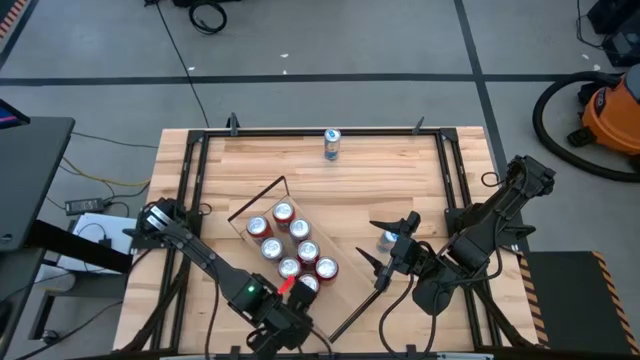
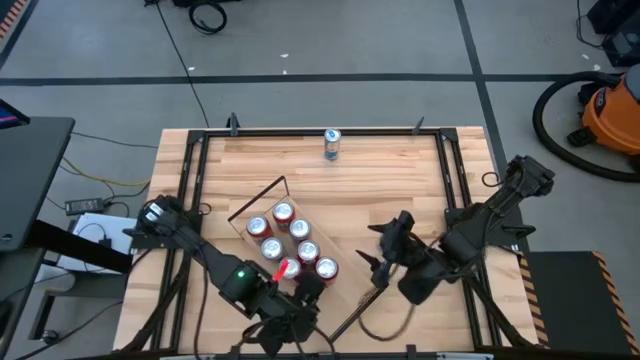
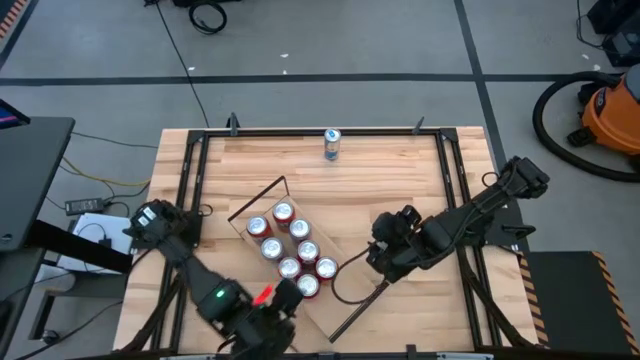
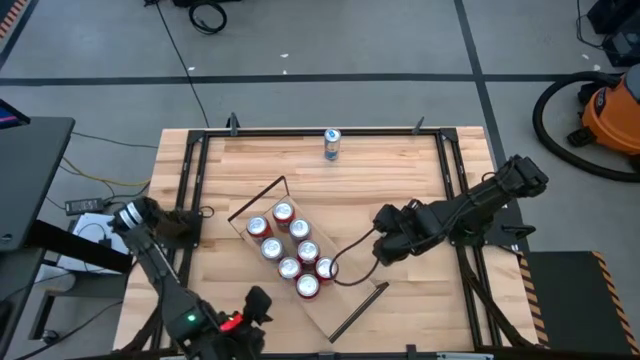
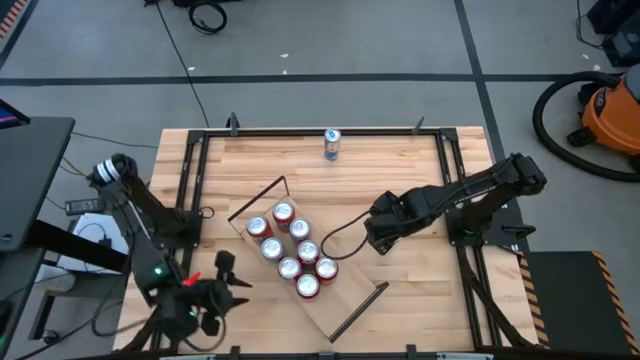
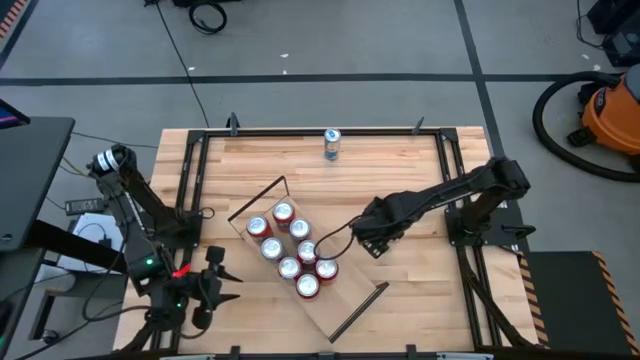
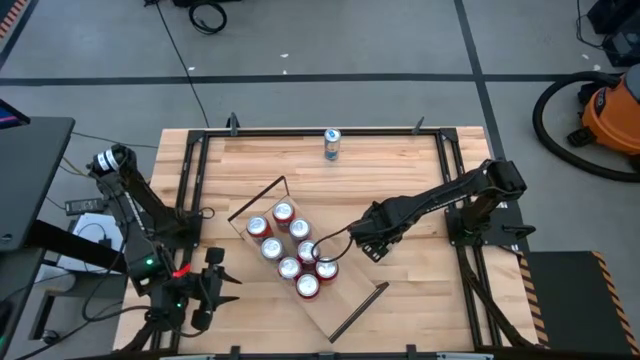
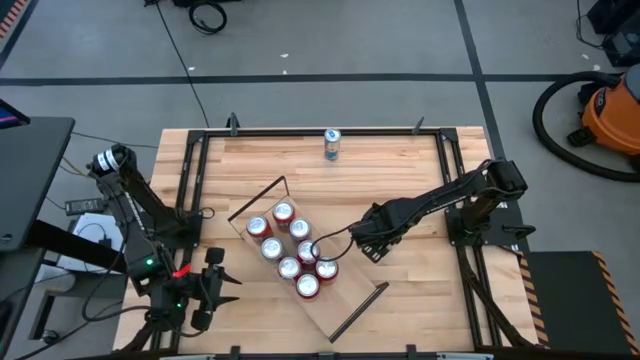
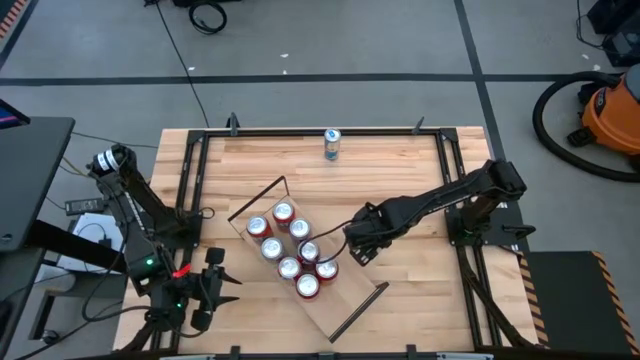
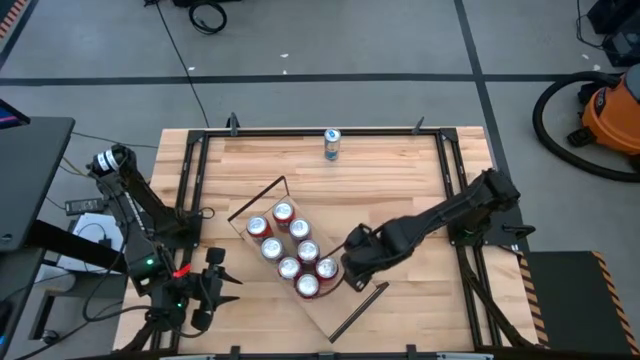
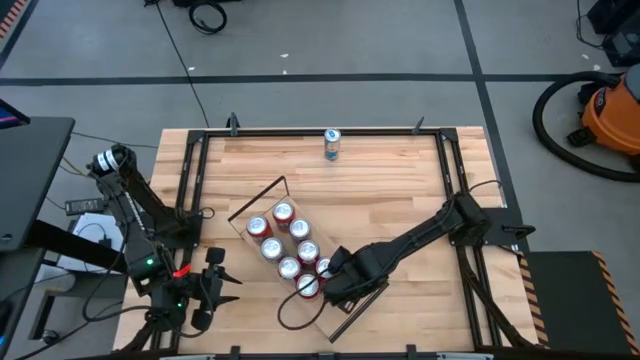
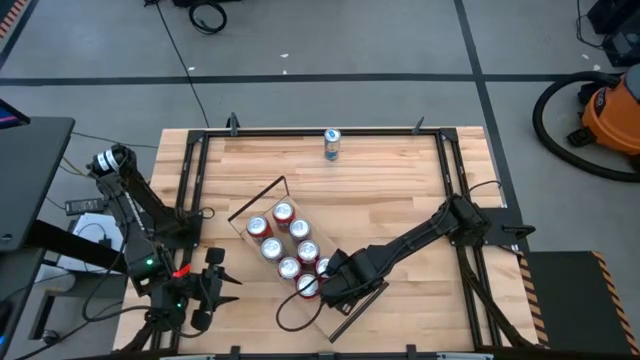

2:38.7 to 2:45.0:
Task: Place canned beverage on shelf
Put the bottom silver soda can on the shelf

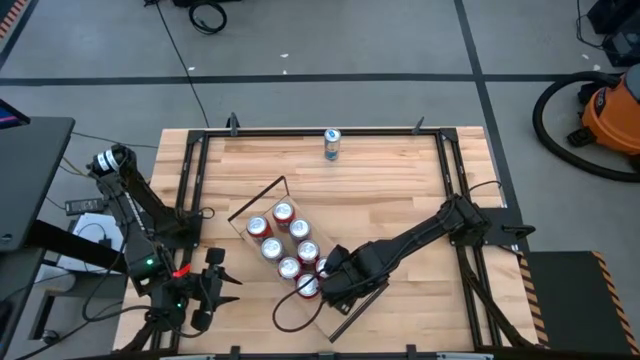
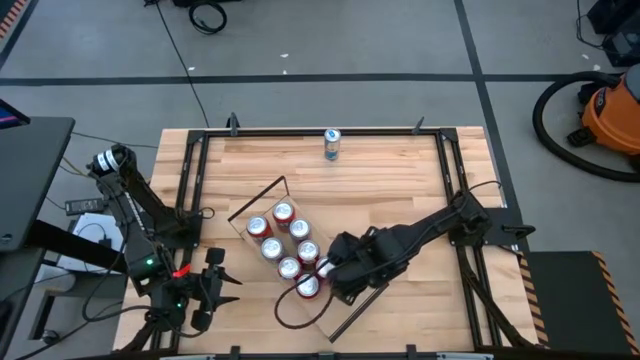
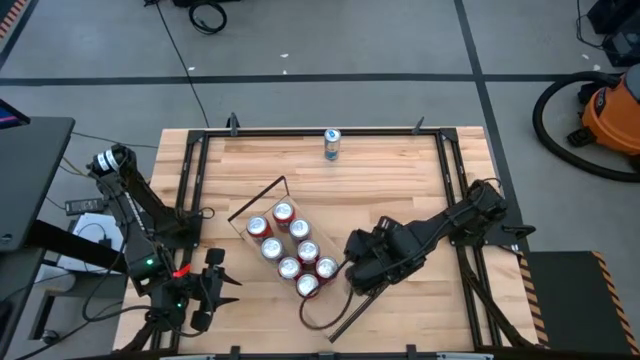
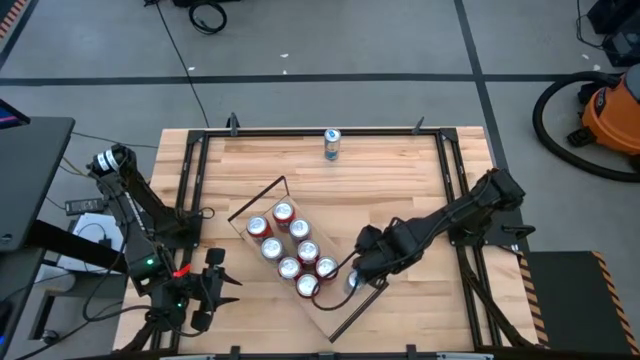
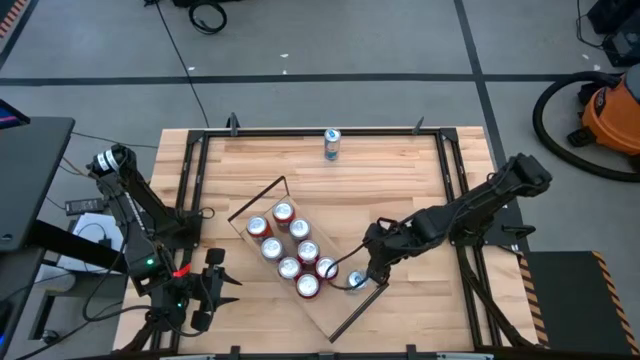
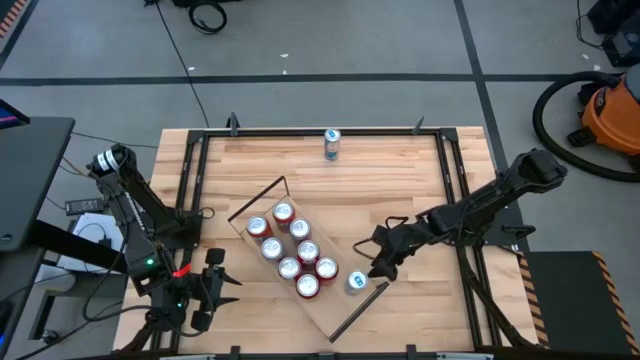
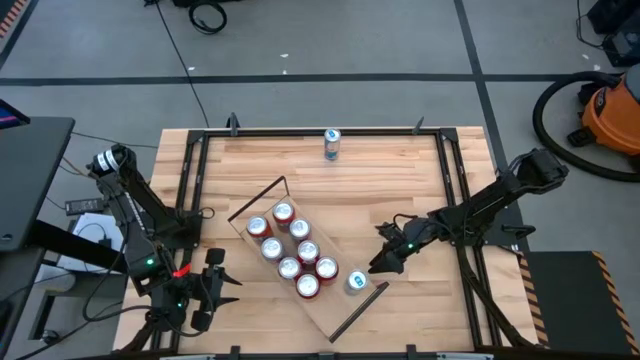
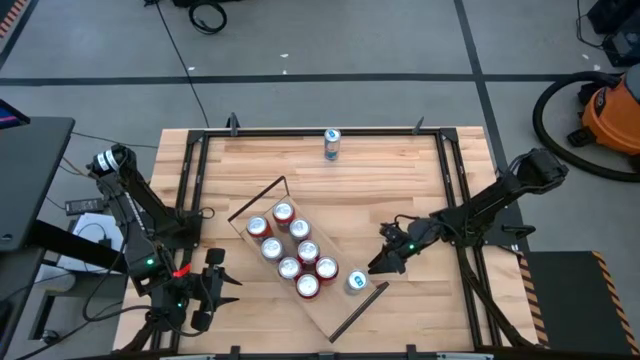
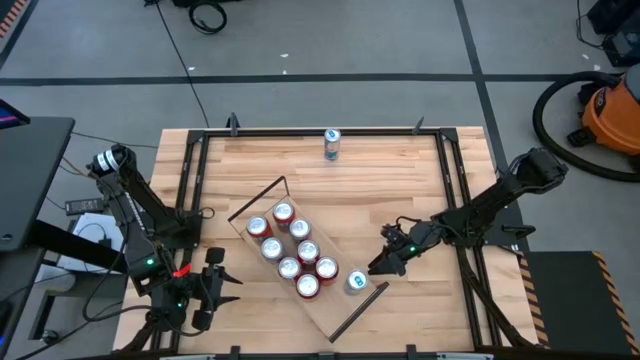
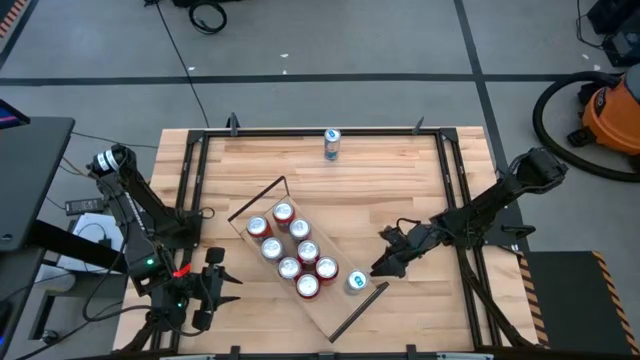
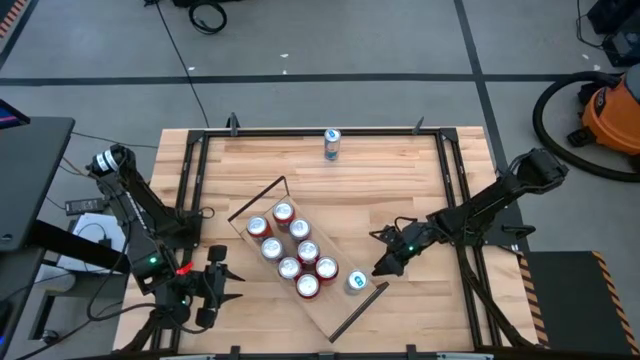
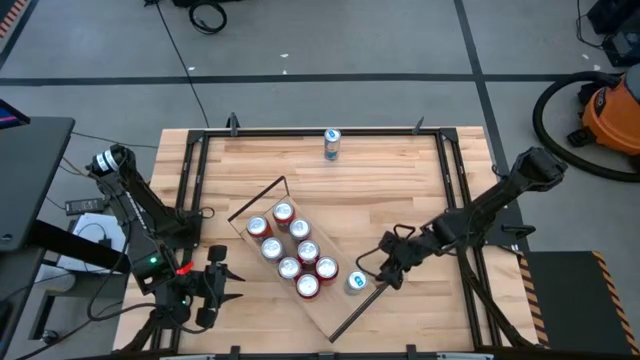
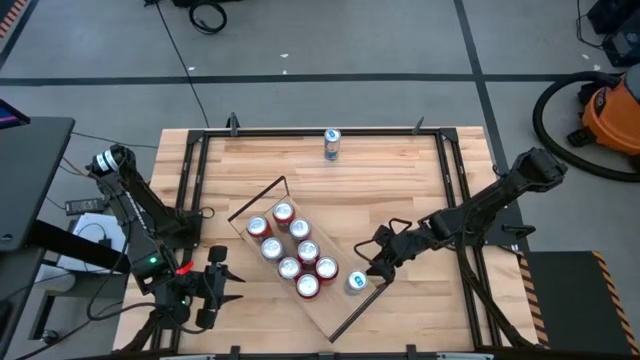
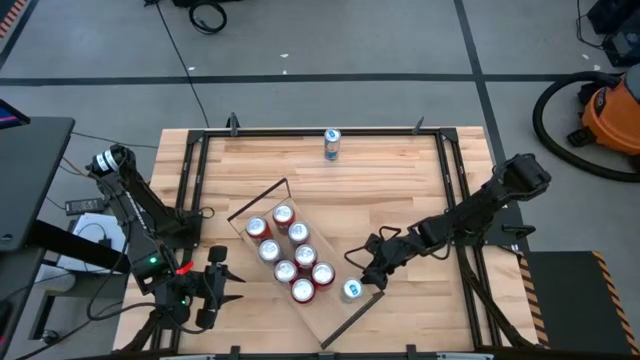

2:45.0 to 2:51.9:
Adjust the shelf on the table

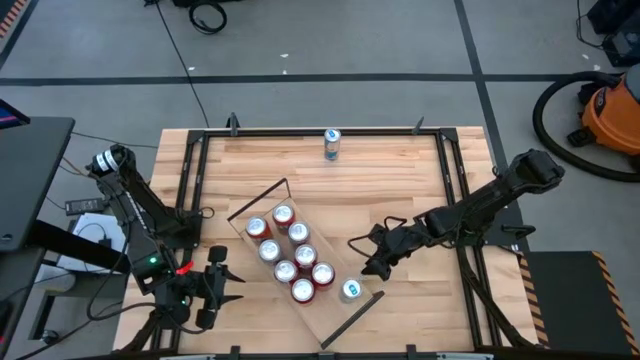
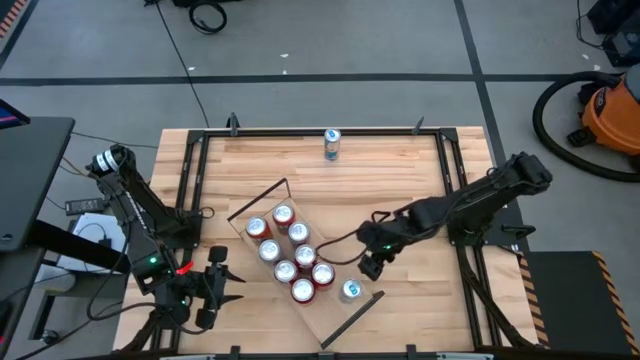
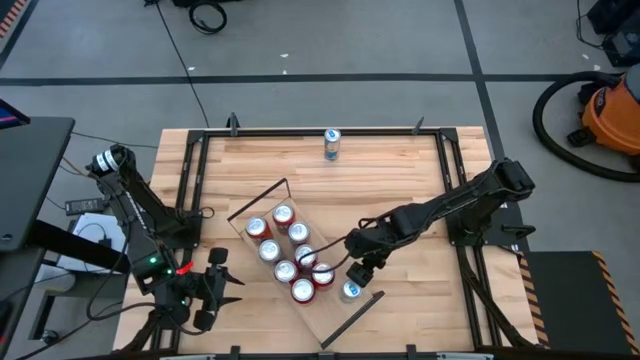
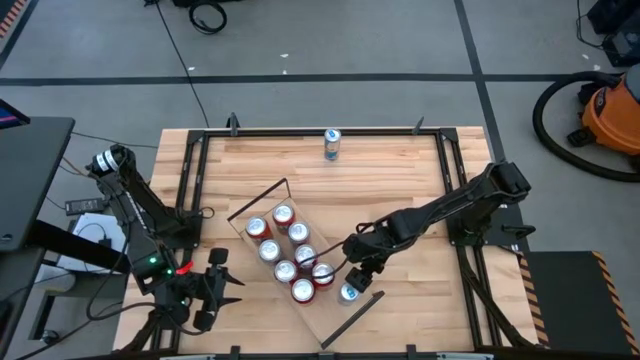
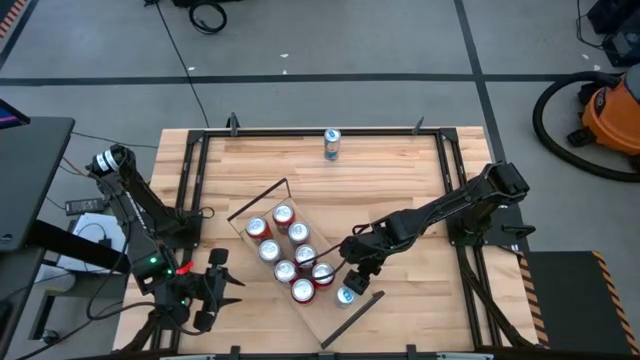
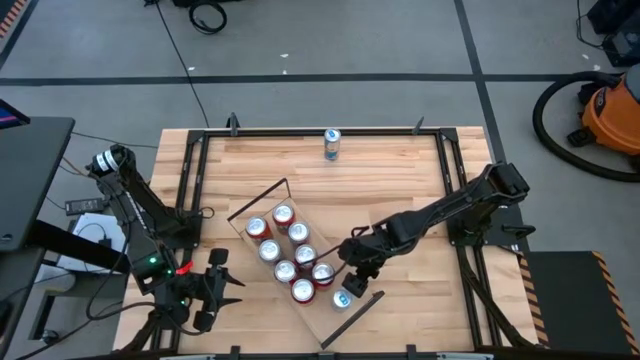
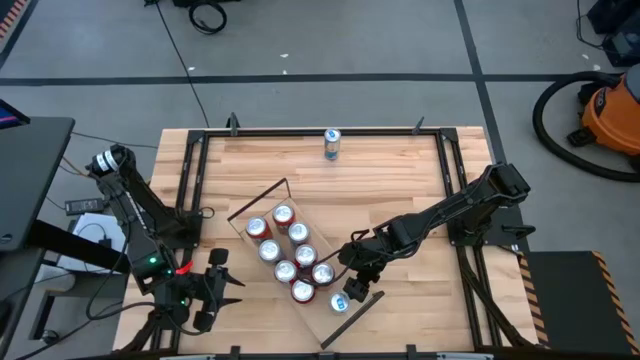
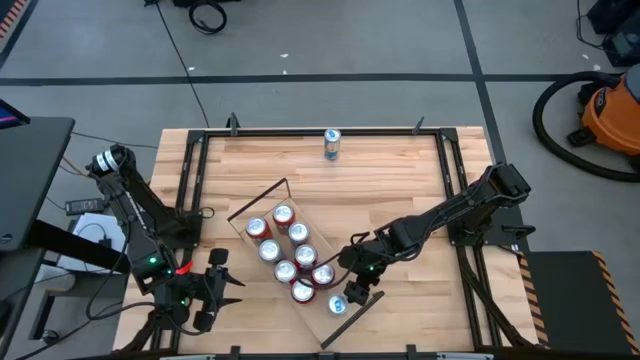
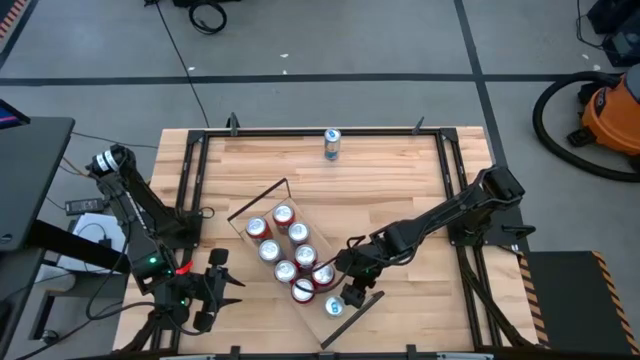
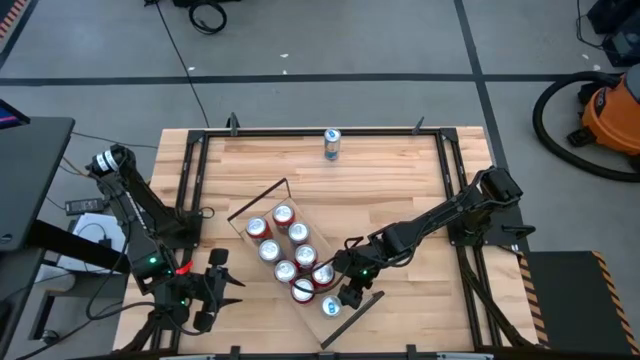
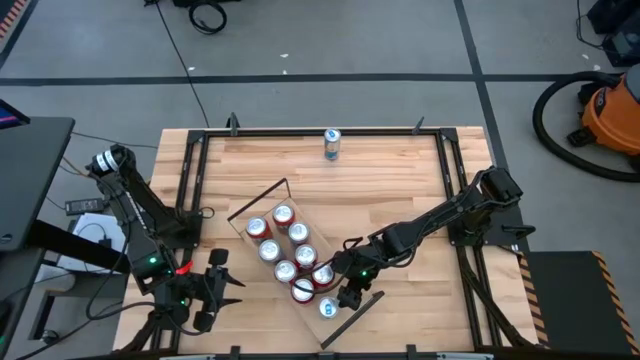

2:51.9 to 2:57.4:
Move the silver can to the bottom left of the shelf

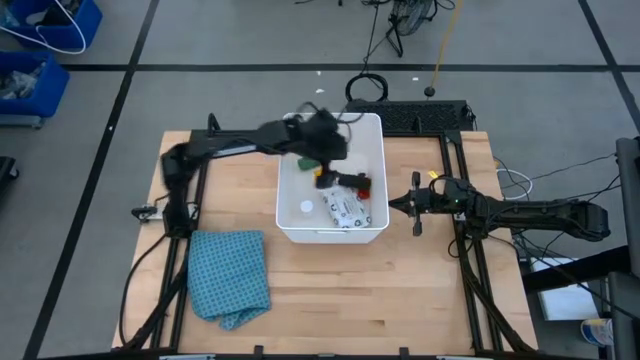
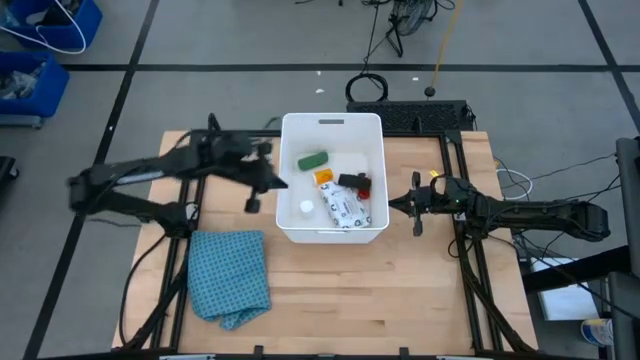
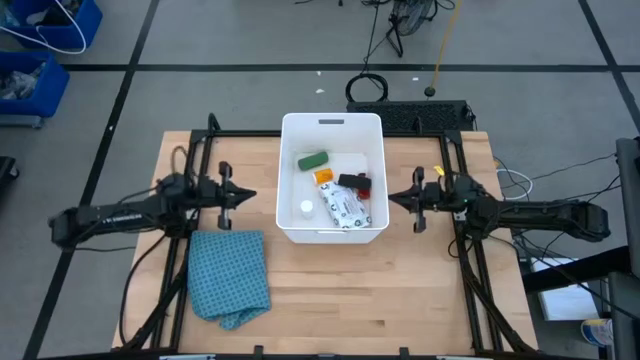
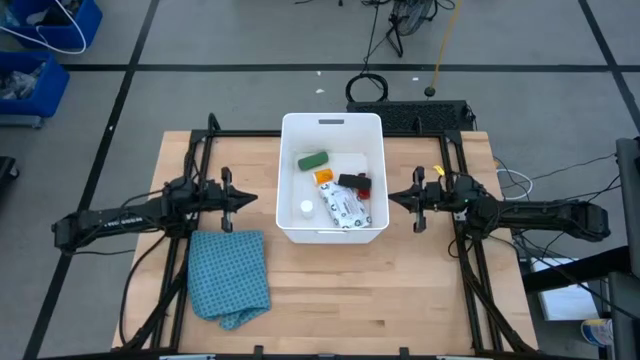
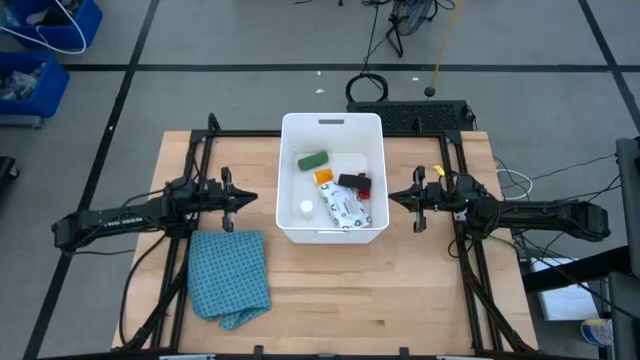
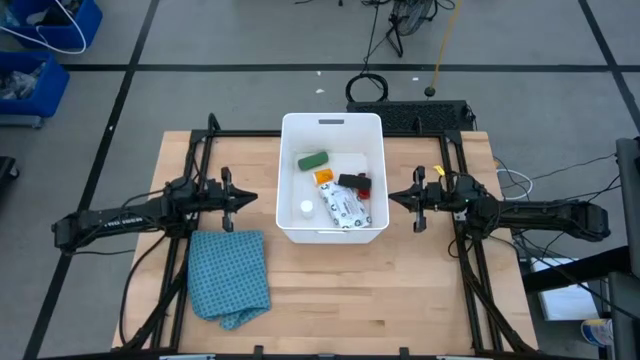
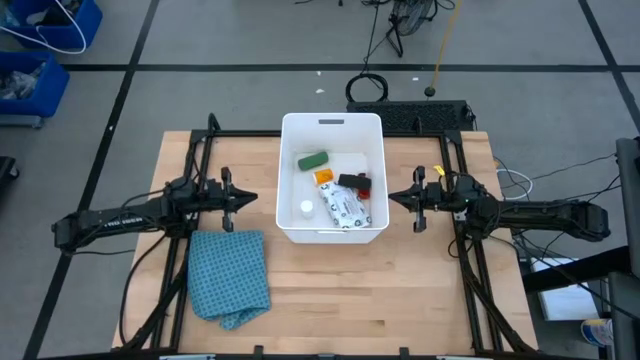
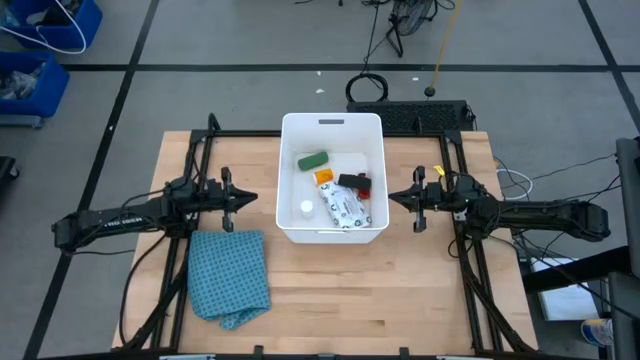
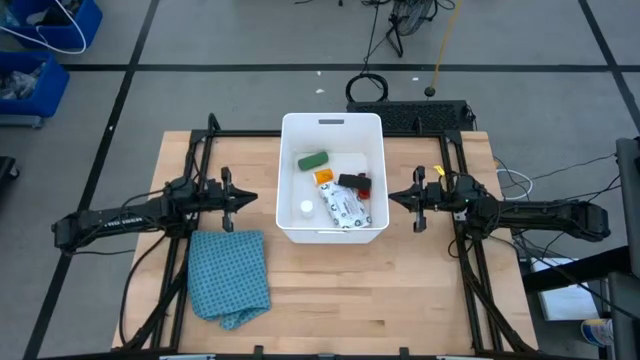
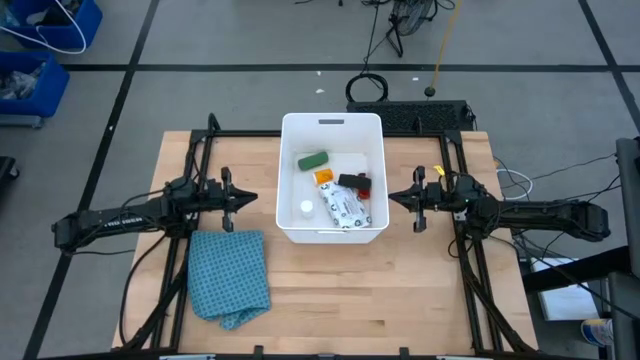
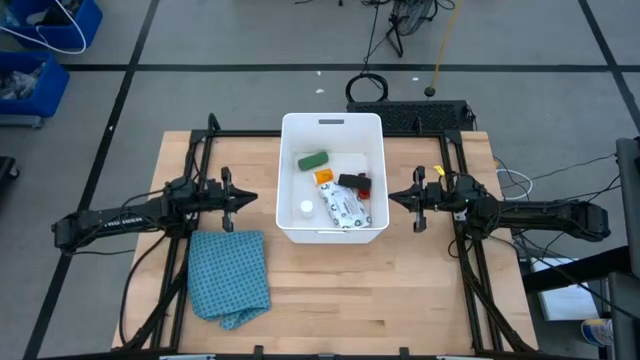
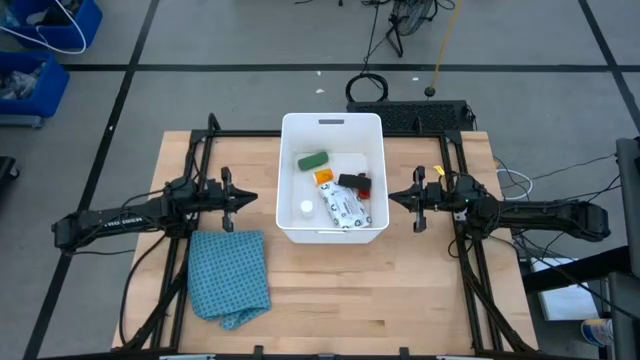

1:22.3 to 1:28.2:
Task: Pick & place medical supplies in basket/bin
Return to Home Position
